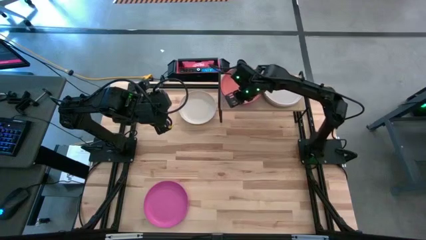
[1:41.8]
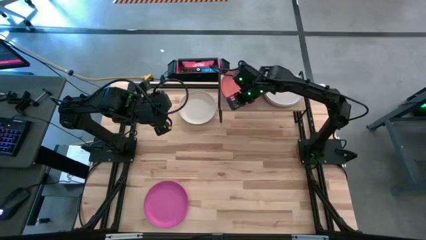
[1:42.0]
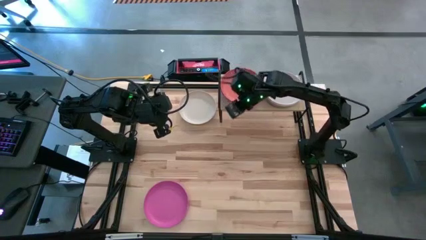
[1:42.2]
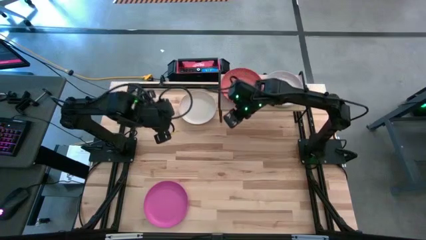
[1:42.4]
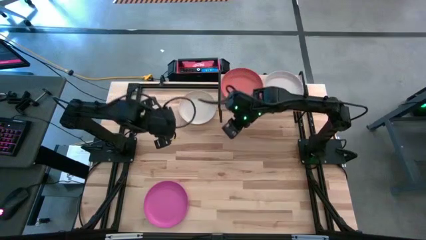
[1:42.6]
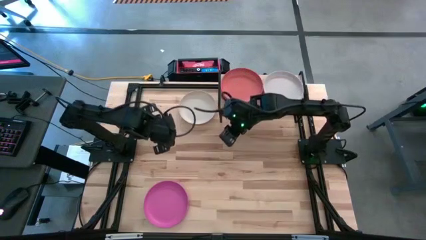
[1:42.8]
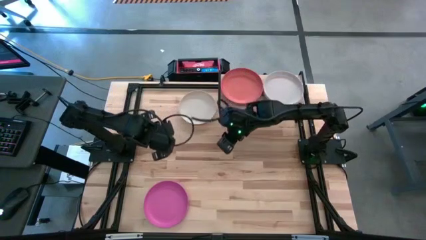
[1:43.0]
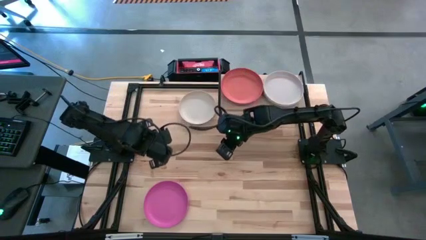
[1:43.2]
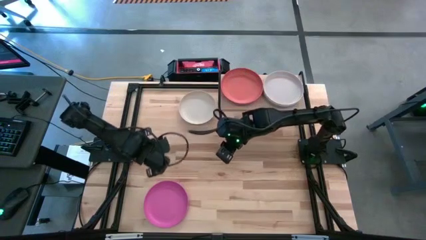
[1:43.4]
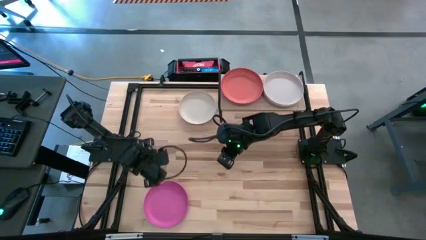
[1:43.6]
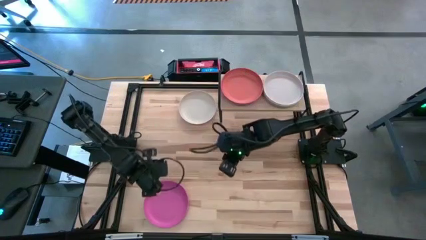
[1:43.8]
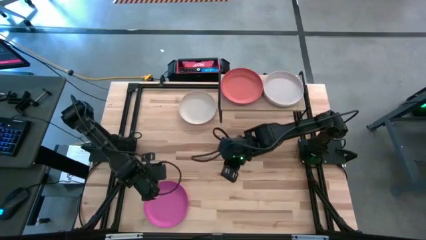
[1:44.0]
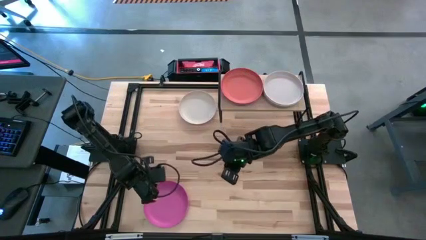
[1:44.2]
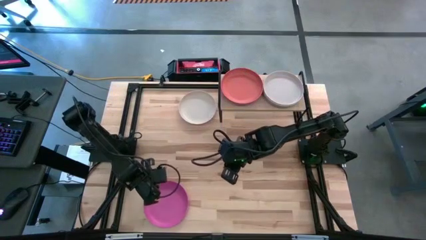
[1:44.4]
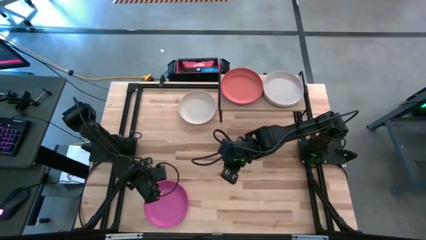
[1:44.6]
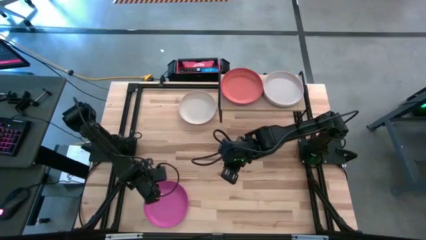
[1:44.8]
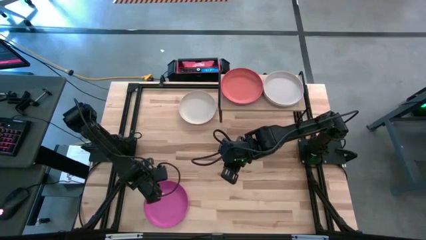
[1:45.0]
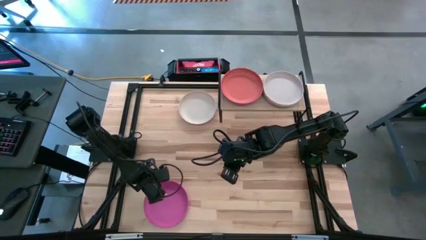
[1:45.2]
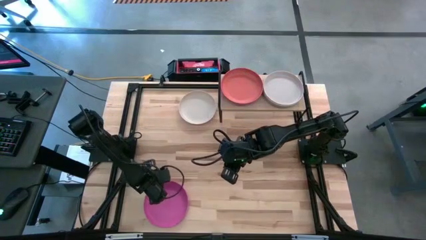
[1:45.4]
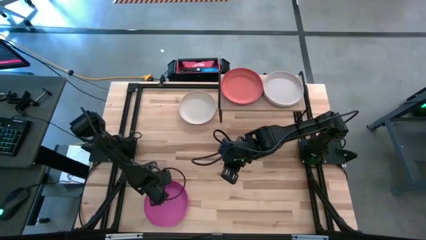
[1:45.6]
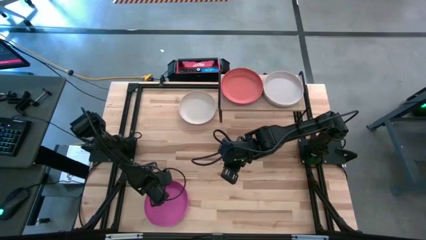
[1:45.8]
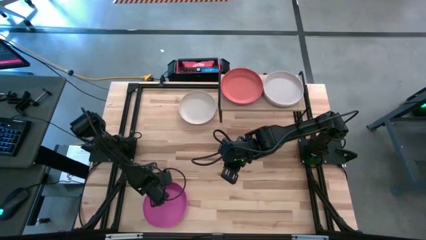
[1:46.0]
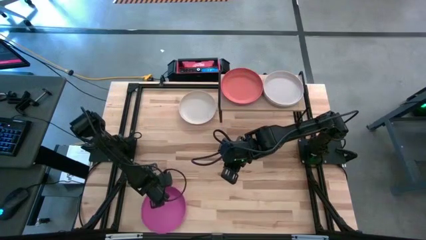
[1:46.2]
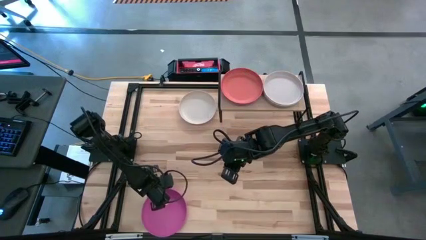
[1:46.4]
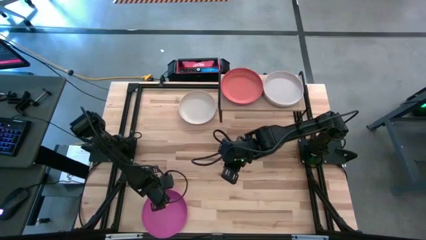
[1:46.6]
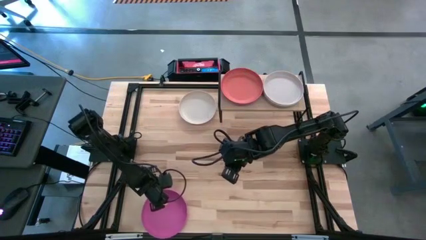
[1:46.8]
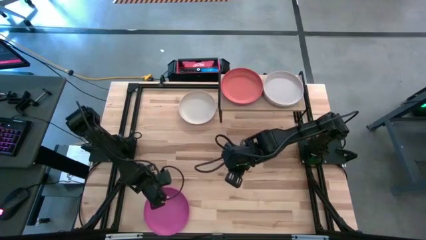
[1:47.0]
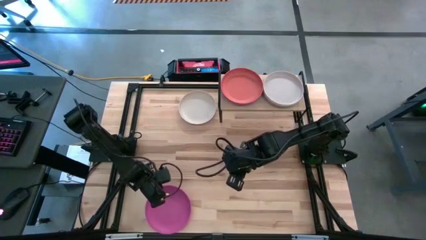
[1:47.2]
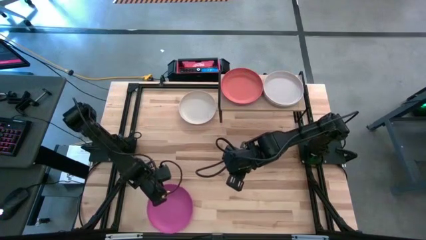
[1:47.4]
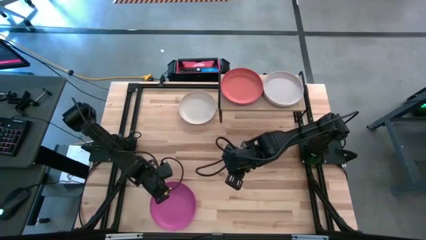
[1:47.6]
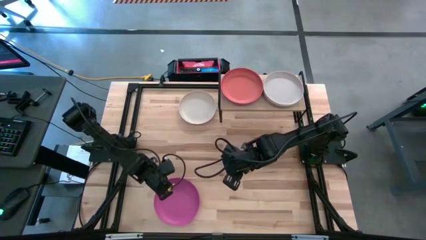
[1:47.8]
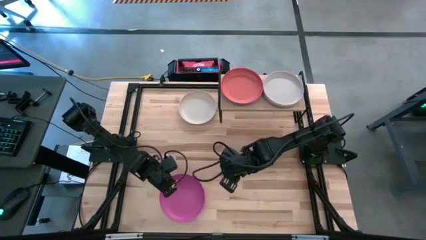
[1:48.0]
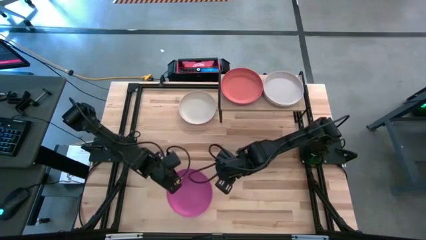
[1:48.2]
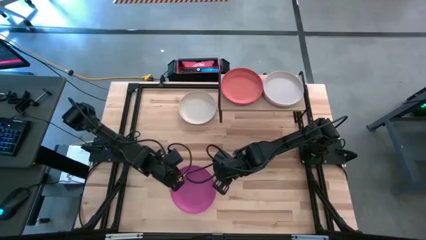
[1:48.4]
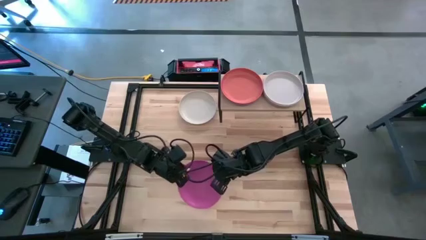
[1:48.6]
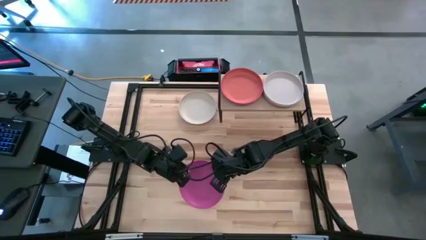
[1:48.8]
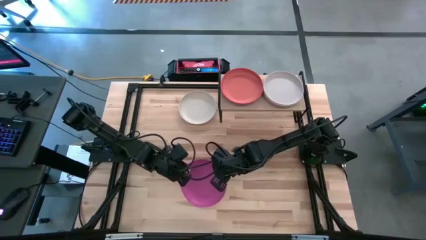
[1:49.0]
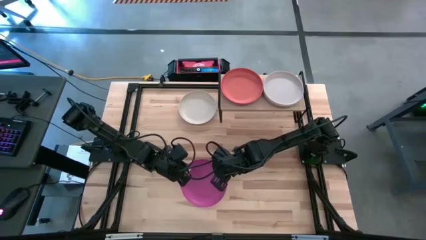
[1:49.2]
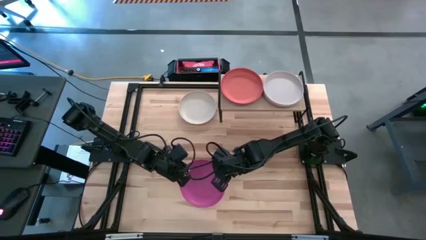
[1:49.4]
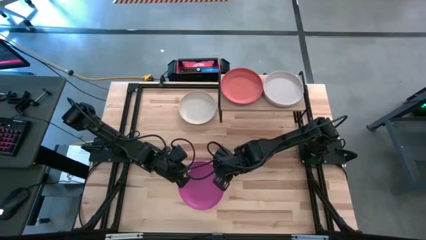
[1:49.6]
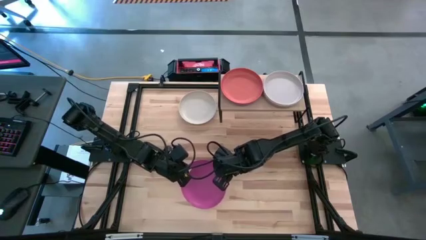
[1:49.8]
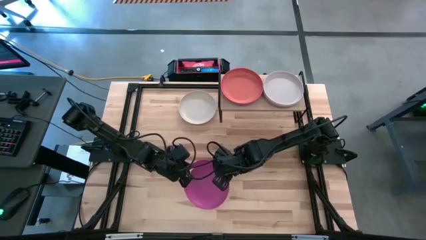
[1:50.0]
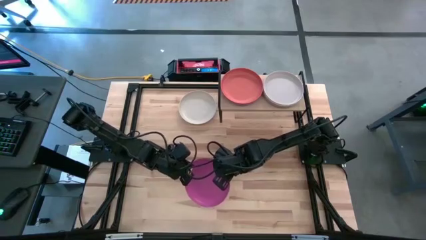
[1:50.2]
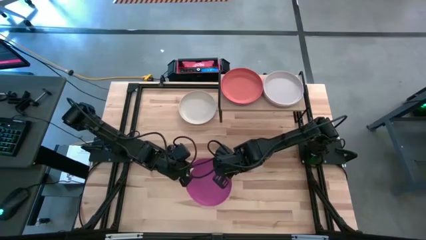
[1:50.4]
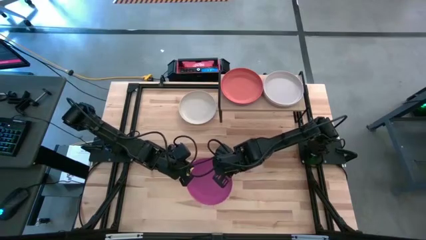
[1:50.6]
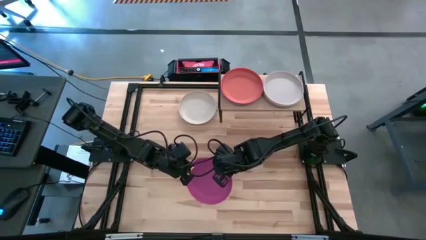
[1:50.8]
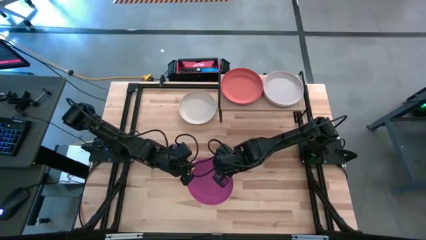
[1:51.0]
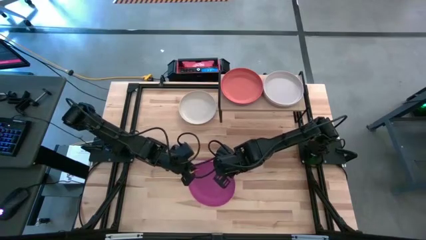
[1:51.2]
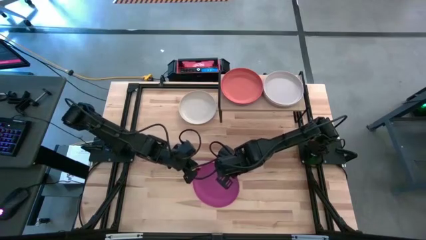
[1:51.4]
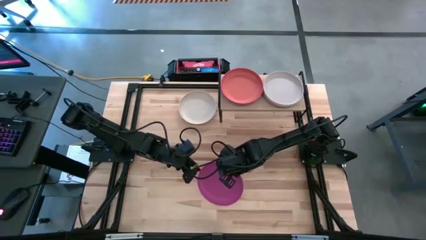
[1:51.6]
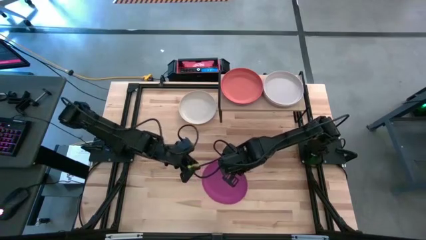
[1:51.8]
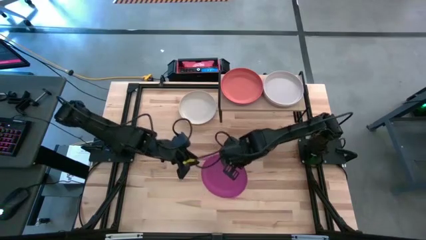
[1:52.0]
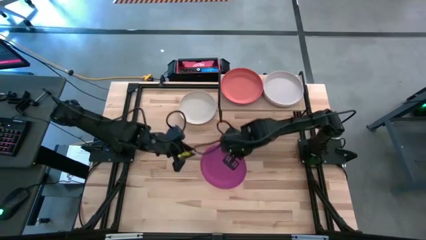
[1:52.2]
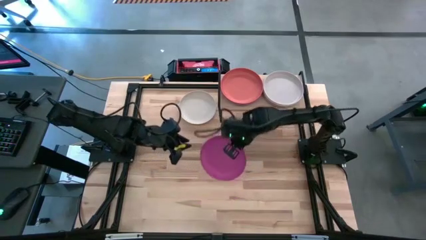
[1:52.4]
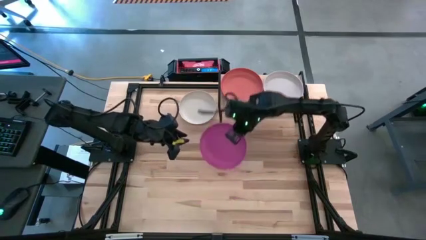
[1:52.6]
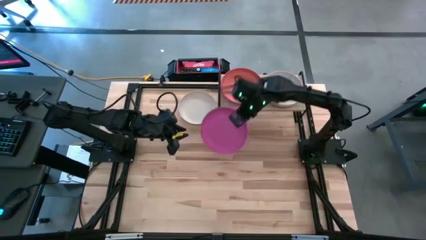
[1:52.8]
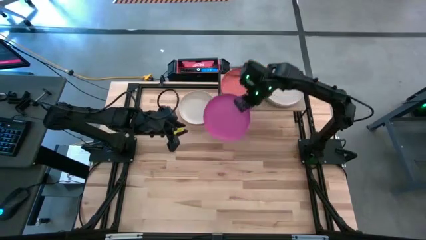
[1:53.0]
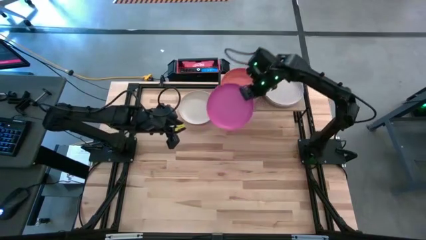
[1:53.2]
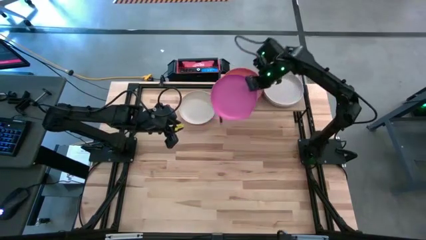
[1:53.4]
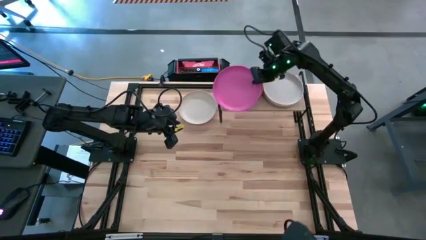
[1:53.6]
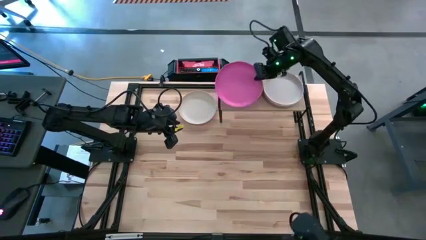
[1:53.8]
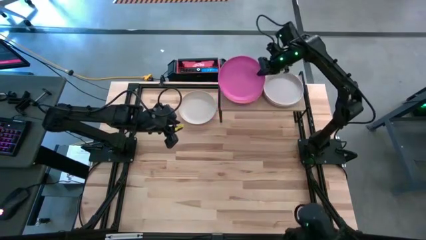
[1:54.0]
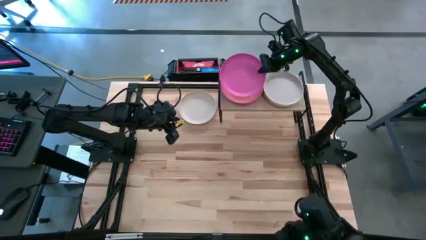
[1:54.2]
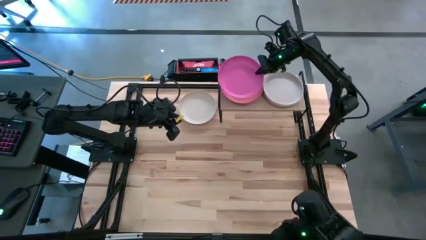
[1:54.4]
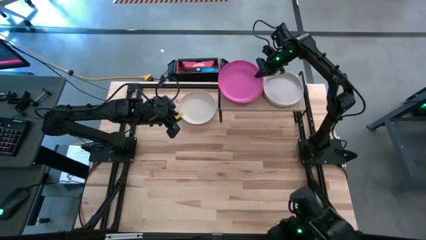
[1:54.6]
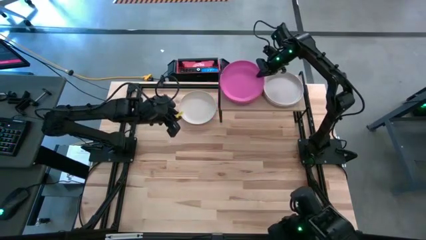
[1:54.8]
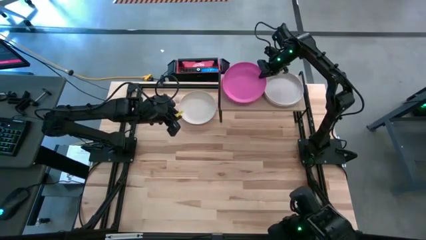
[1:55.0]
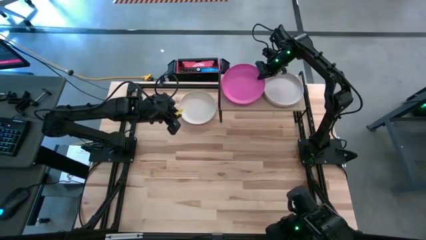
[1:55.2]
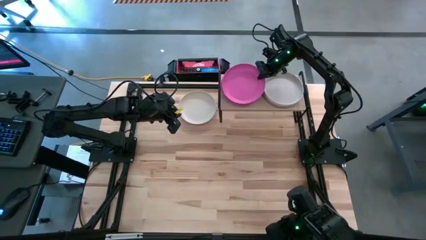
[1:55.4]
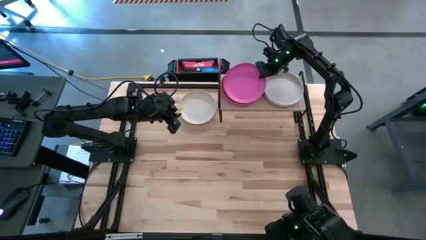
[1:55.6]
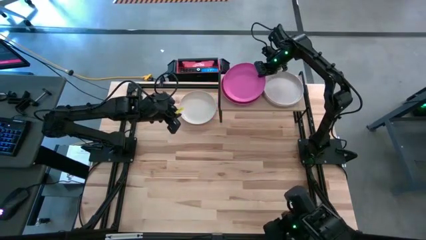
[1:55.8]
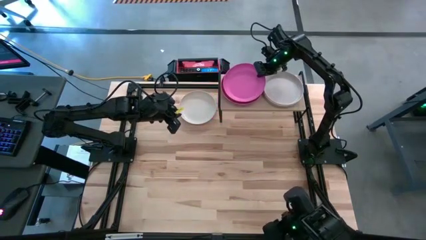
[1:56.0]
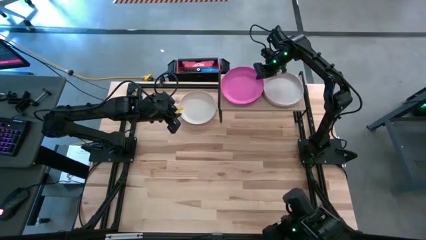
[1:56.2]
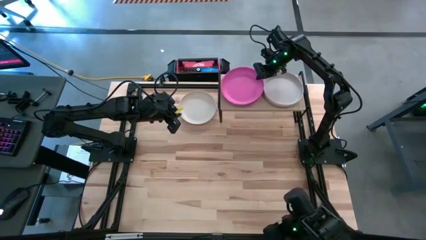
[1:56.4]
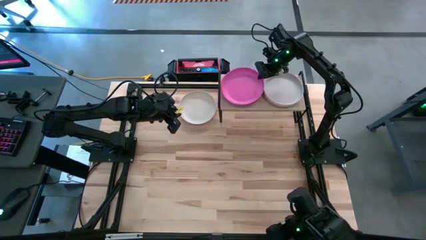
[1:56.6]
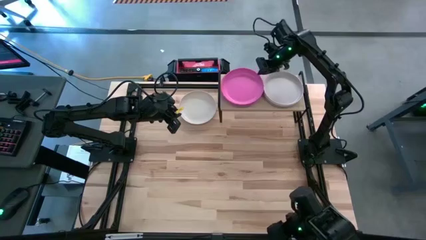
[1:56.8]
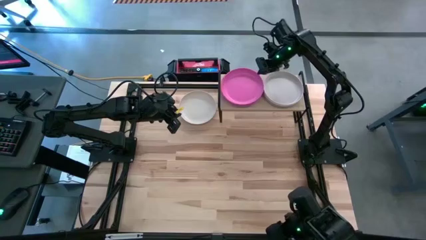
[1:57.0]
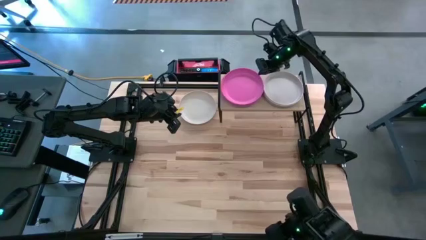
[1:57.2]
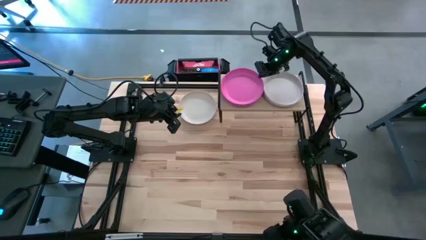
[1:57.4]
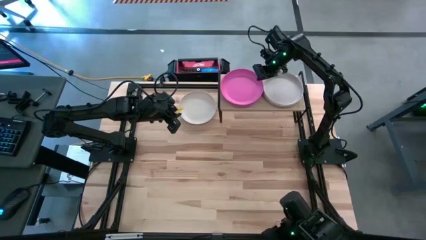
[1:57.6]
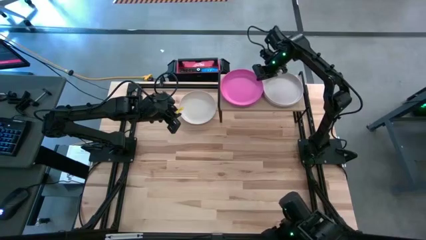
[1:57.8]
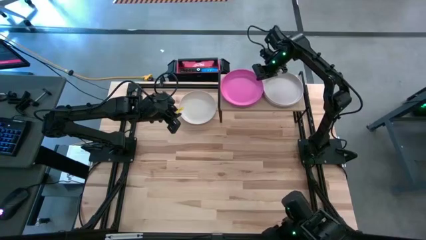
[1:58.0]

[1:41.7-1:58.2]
Task: Place and stack plates onto a shelf
Stack the pink plate on top of the orange plate on the shelf
